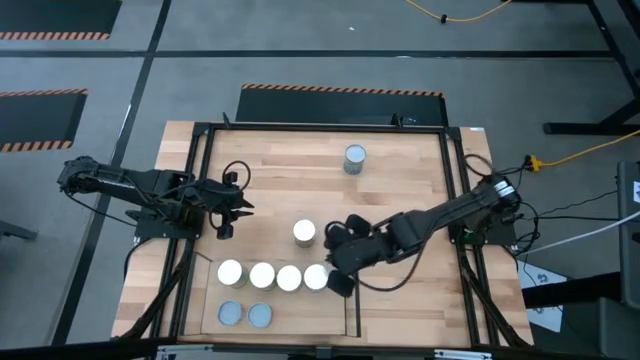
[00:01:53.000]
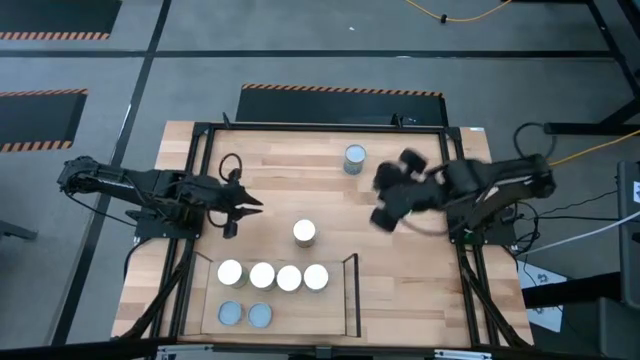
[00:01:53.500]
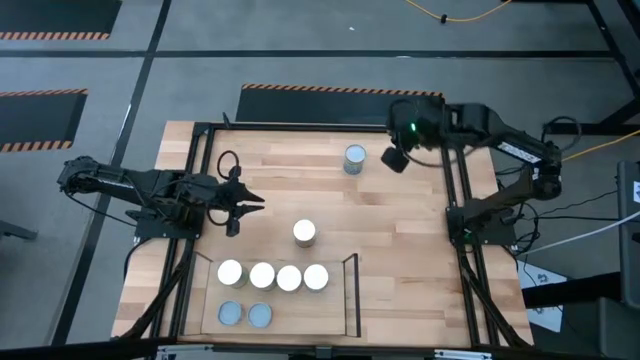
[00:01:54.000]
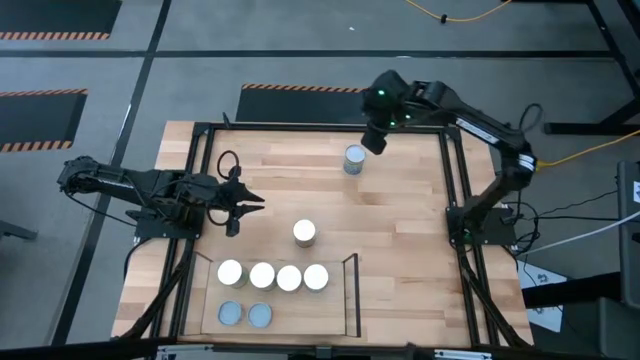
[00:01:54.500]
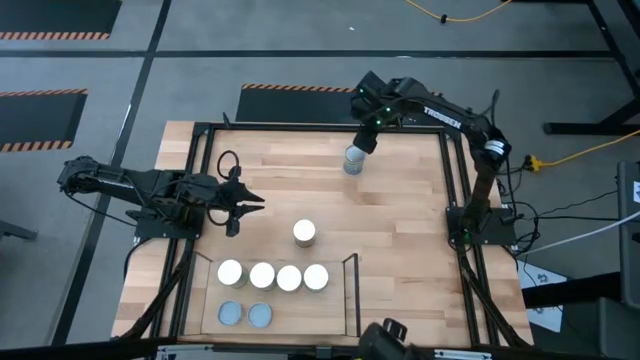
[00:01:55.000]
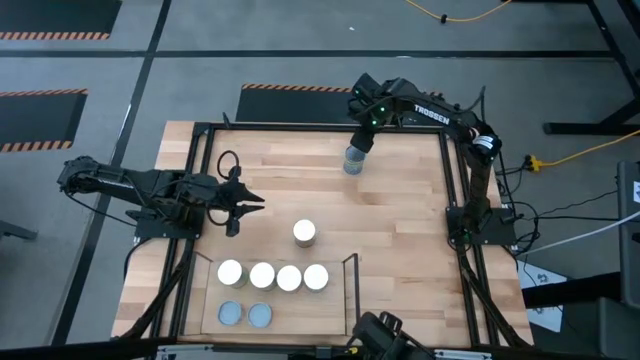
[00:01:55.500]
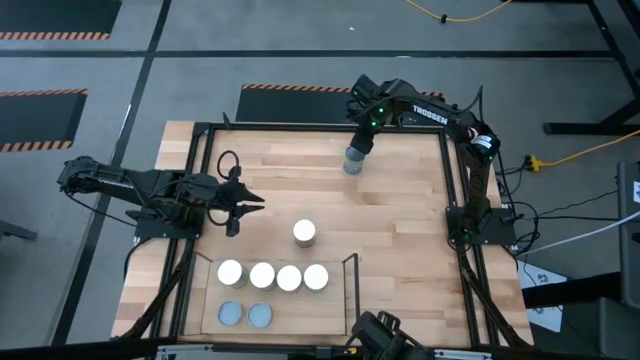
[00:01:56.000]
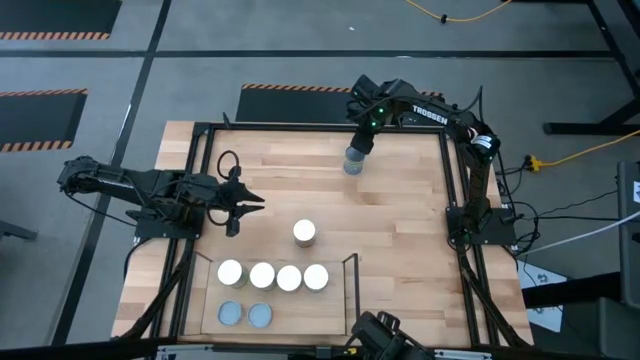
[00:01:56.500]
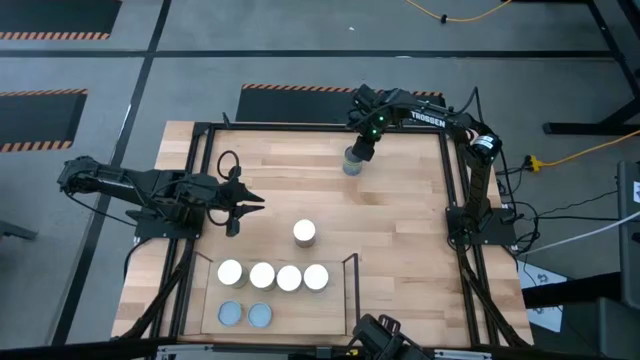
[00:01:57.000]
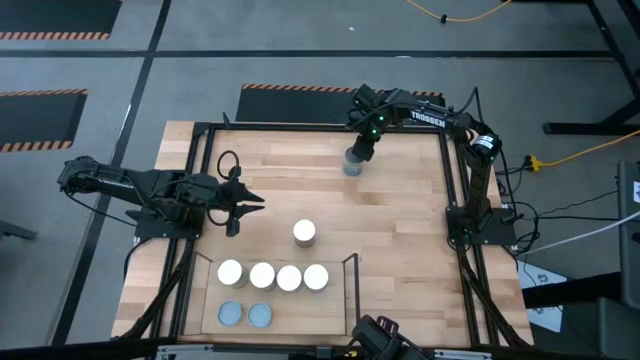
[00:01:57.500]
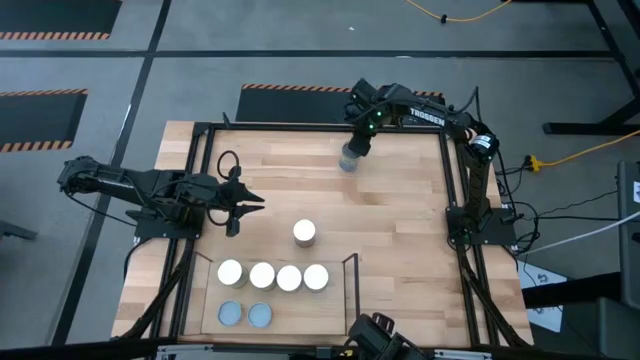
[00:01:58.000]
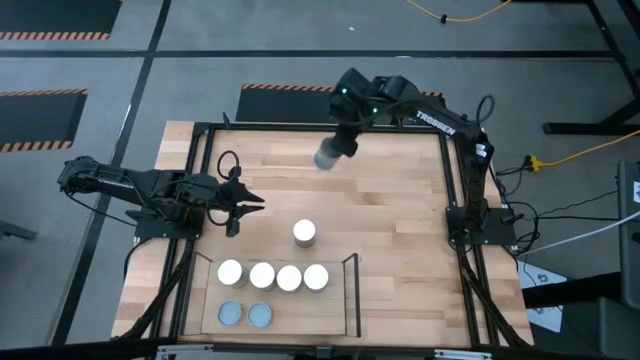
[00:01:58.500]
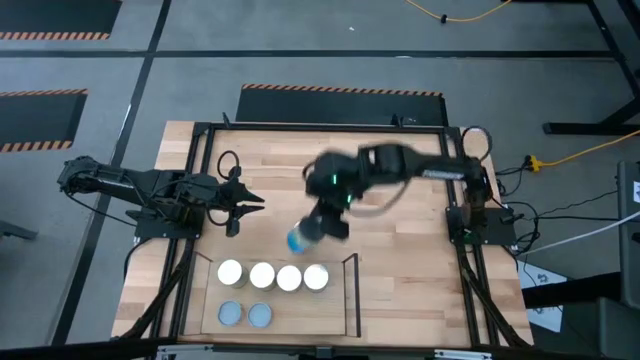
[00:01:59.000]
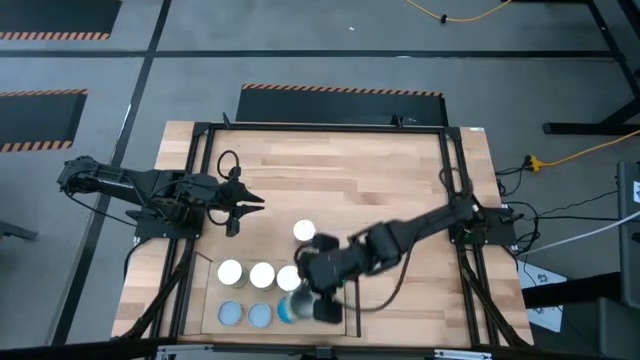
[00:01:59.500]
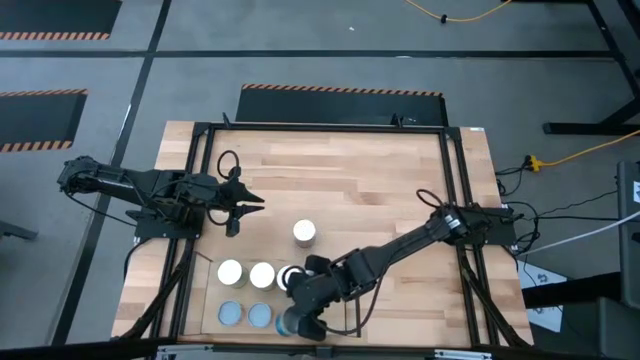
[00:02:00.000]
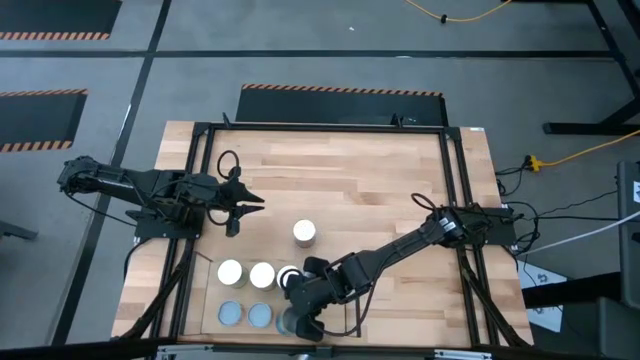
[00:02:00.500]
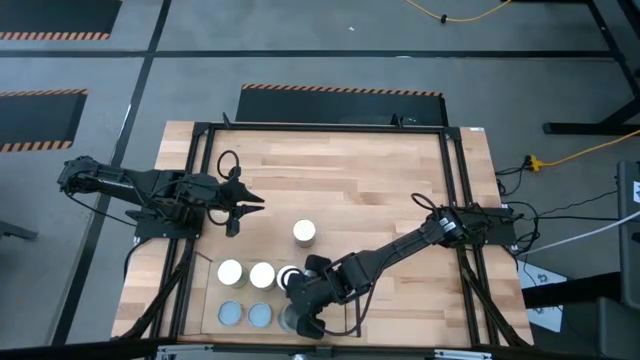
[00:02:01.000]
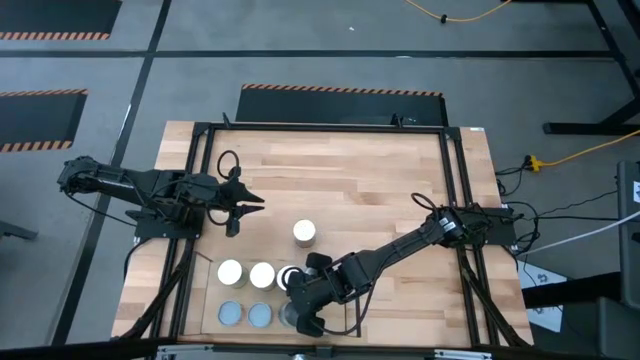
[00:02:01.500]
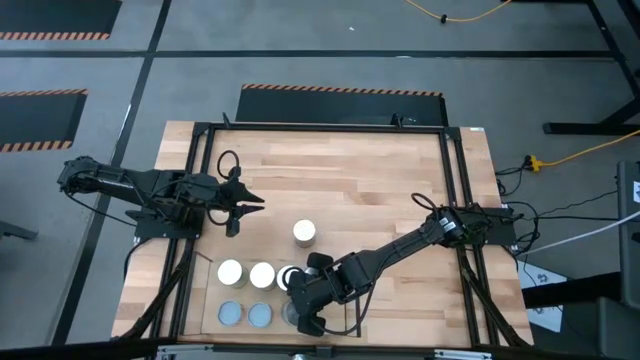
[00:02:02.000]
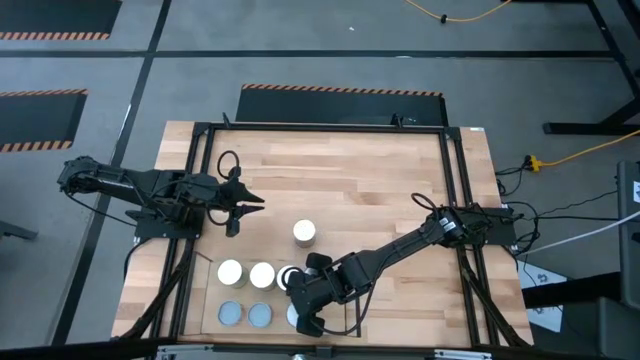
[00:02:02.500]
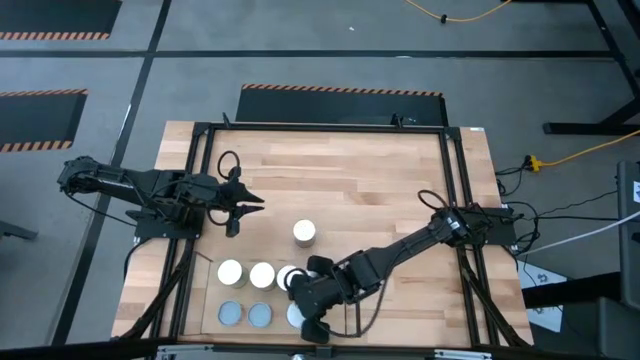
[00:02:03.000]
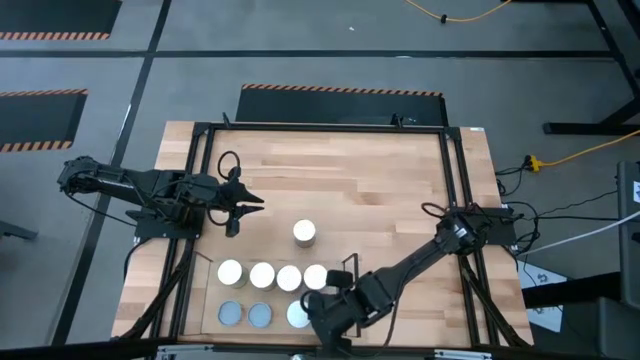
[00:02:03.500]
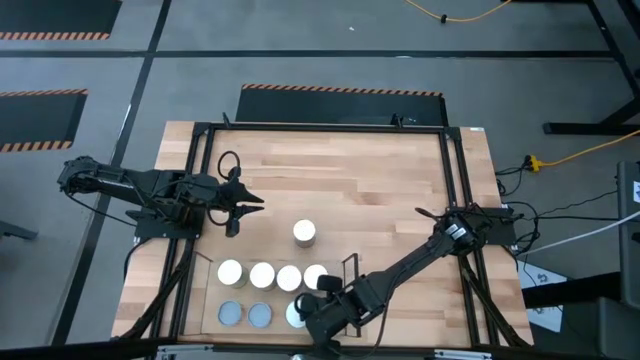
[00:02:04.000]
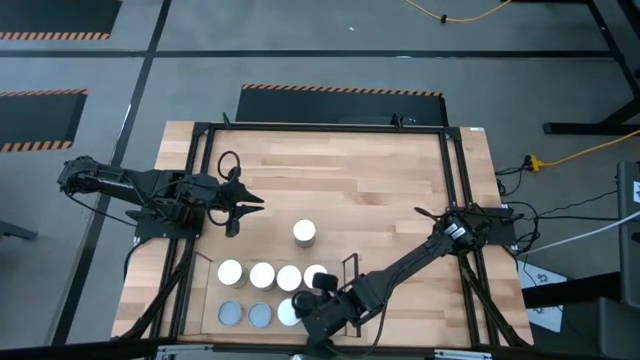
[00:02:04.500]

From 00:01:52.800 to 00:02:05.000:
Task: Pick and place cans onto a shelf
Put the canned cherries on the shelf

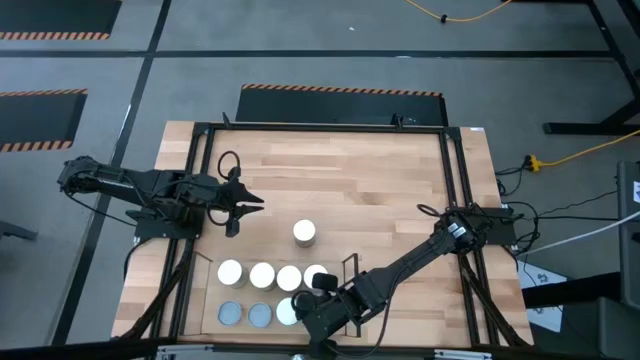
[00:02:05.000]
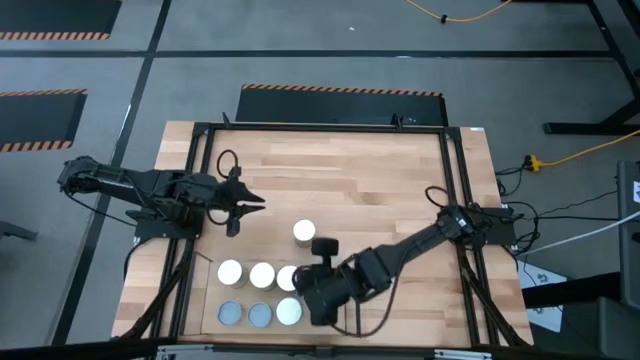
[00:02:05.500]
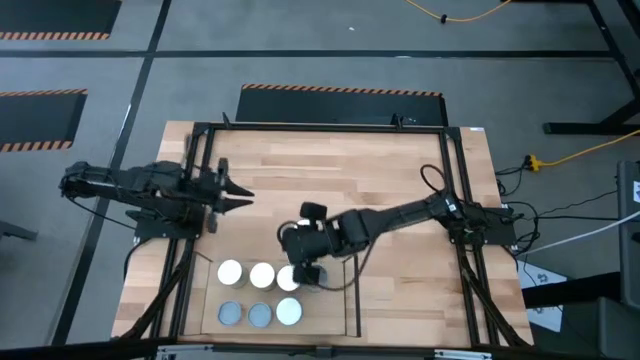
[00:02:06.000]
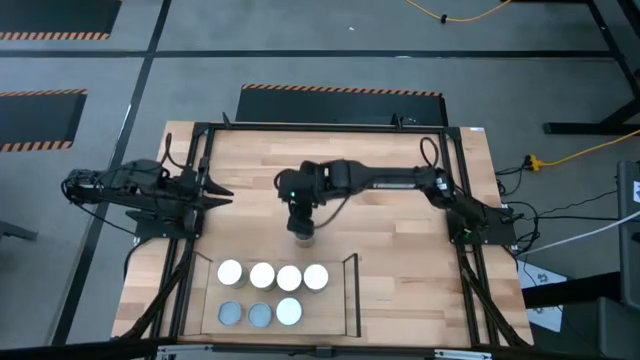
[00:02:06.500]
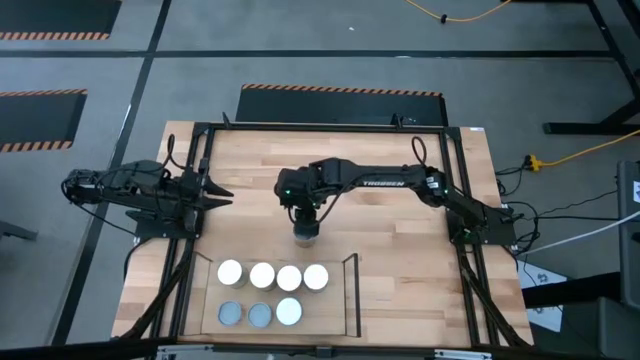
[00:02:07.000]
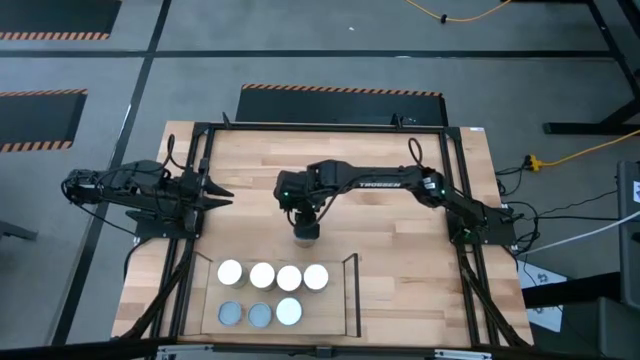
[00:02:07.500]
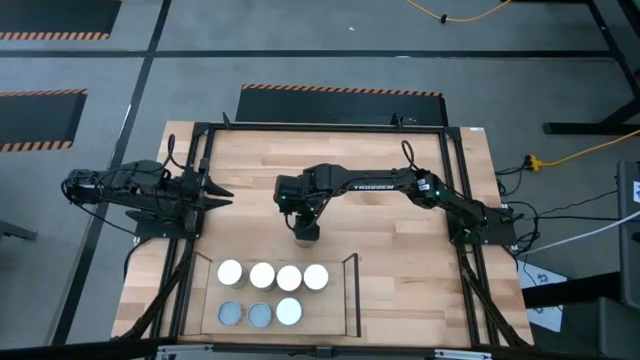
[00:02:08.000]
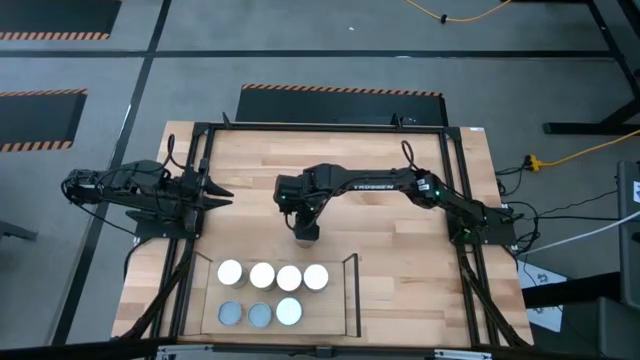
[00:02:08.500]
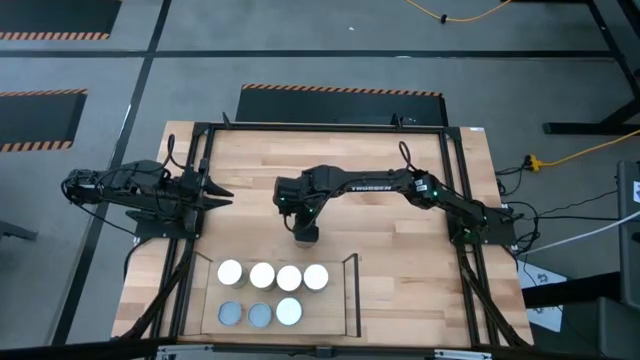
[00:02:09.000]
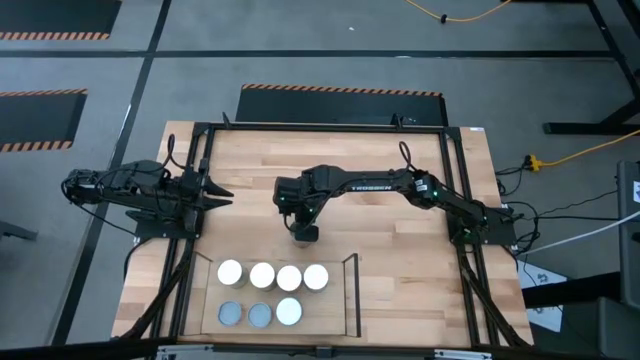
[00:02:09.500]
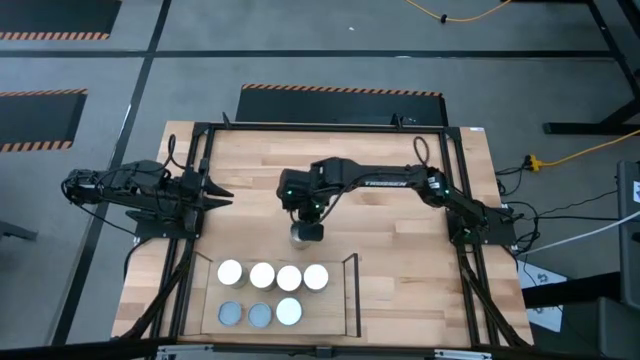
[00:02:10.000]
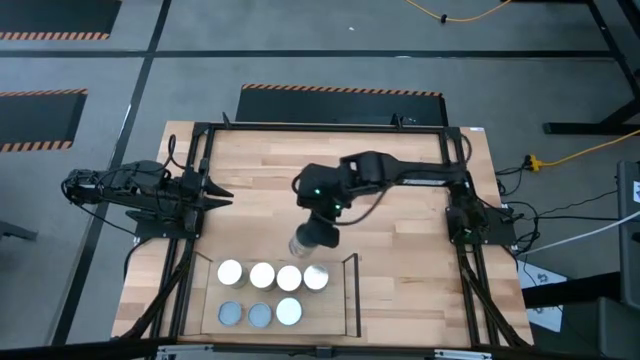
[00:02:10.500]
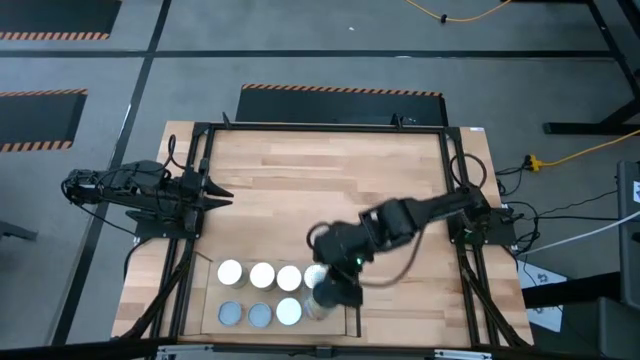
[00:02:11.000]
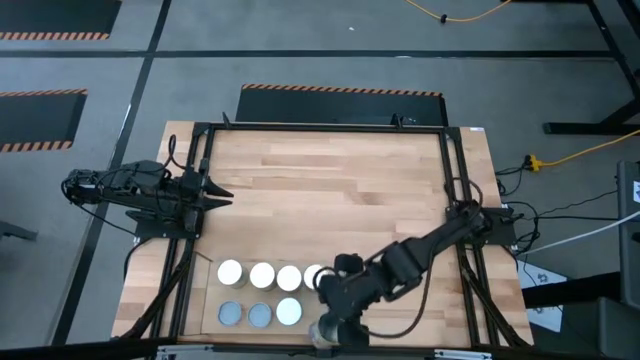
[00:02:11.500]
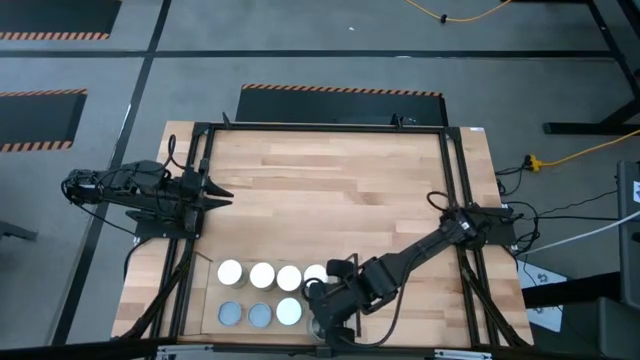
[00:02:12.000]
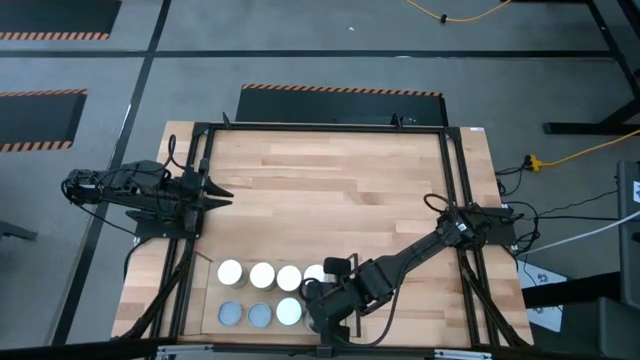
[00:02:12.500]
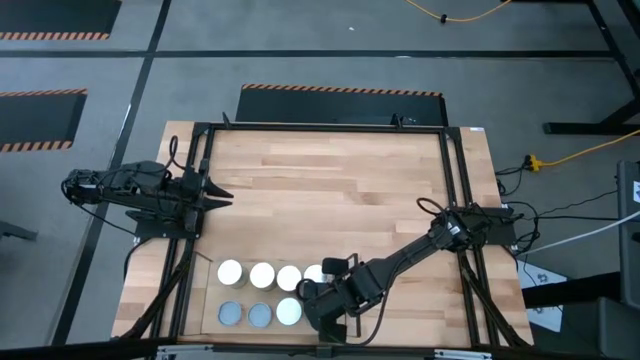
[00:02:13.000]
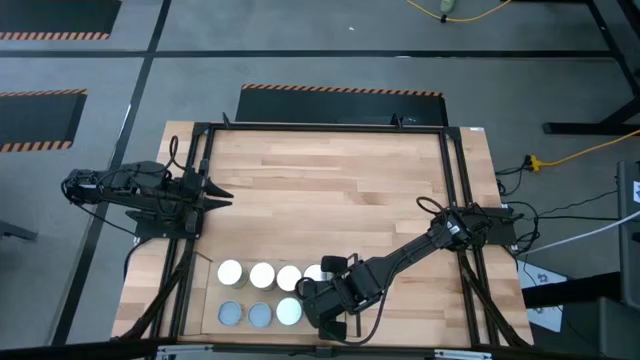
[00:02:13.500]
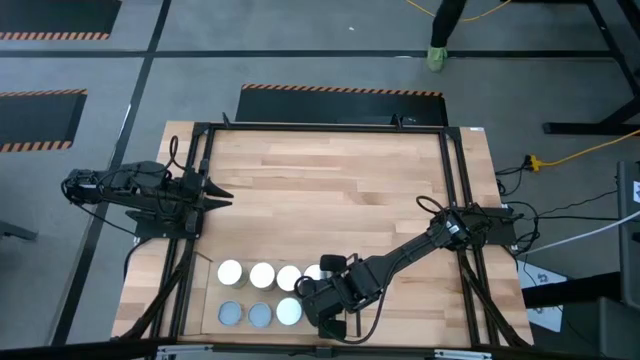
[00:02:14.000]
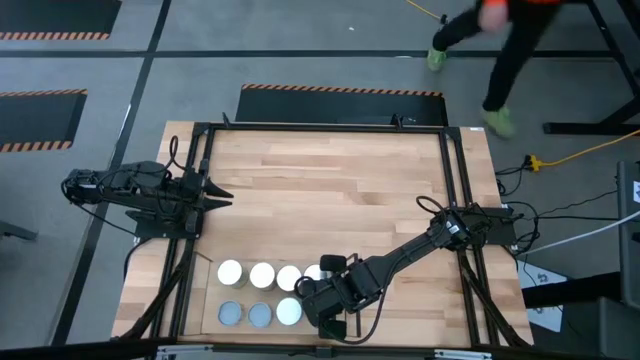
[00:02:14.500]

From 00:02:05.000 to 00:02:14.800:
Put the canned peaches on the shelf
